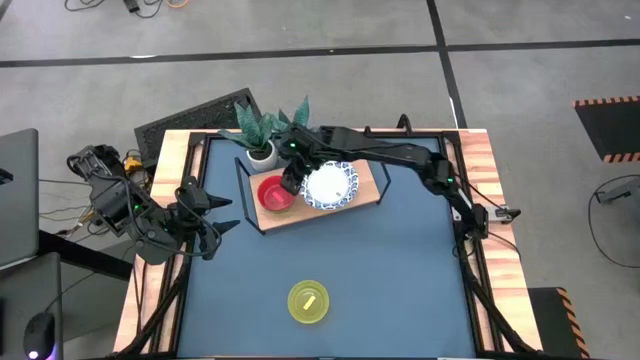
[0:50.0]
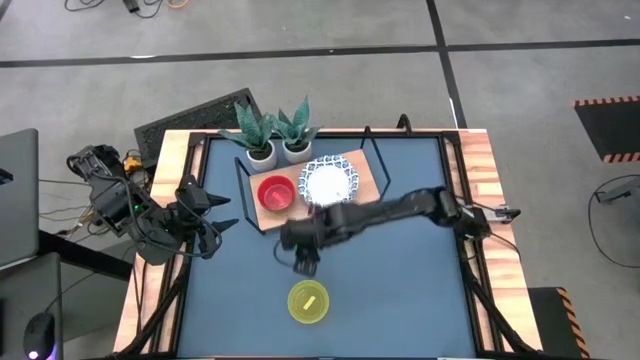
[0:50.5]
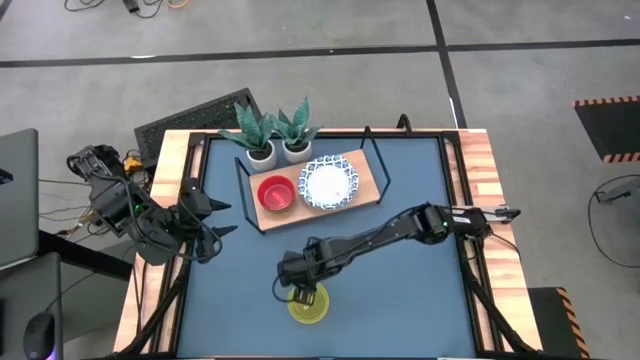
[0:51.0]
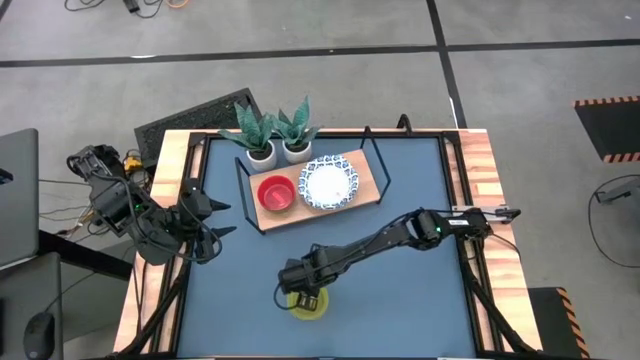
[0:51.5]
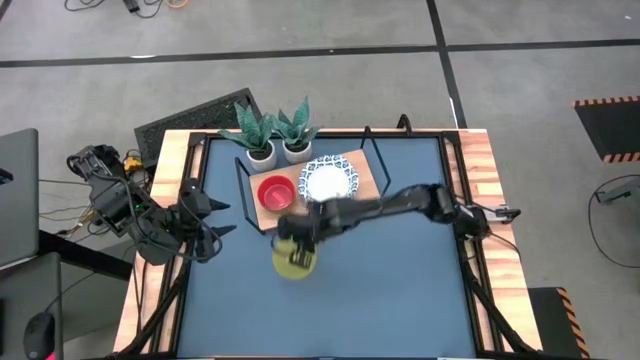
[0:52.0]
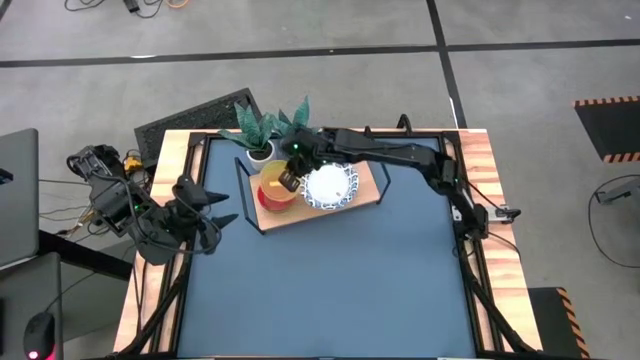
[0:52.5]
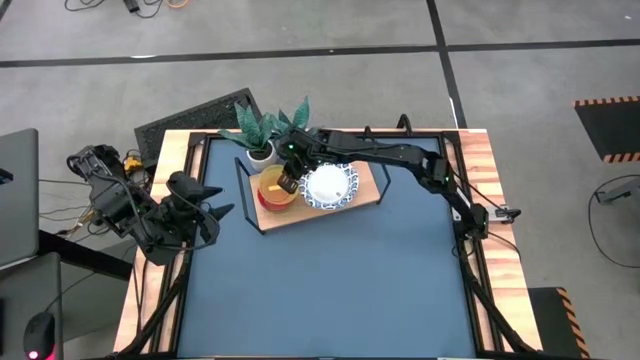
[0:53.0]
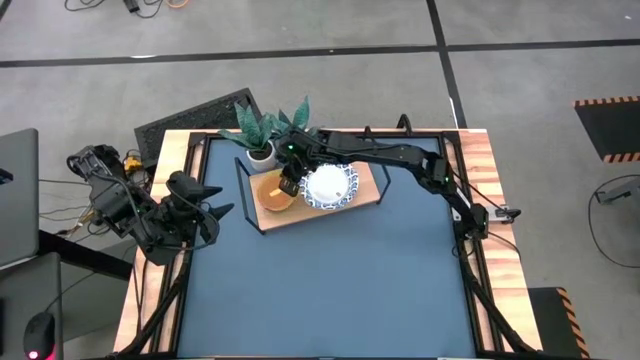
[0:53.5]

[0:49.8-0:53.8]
Task: Place and stack bowls onto a shelf
Stack the yellow bowl on top of the orange bowl on the shelf

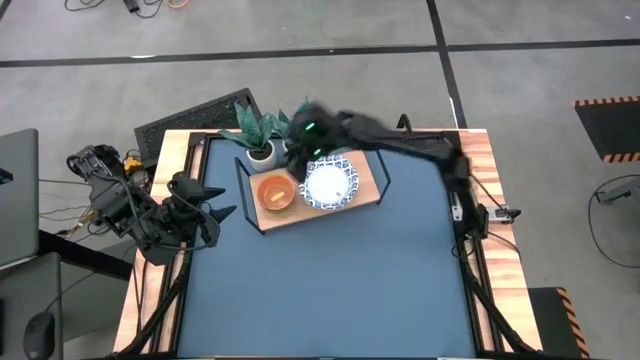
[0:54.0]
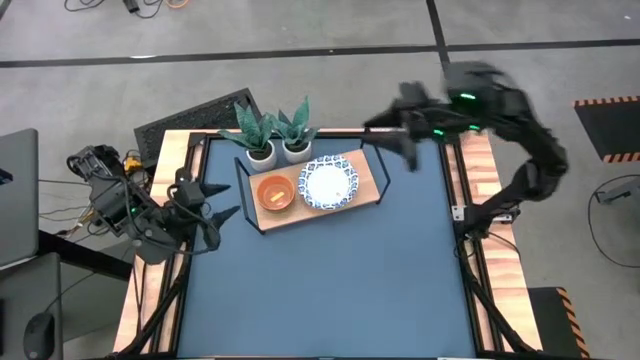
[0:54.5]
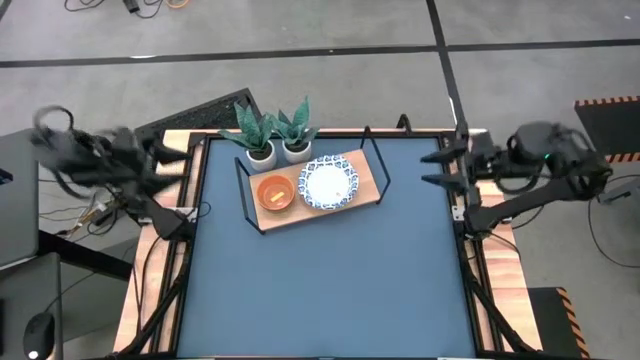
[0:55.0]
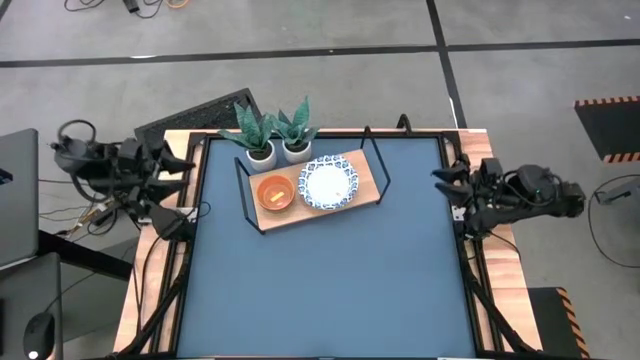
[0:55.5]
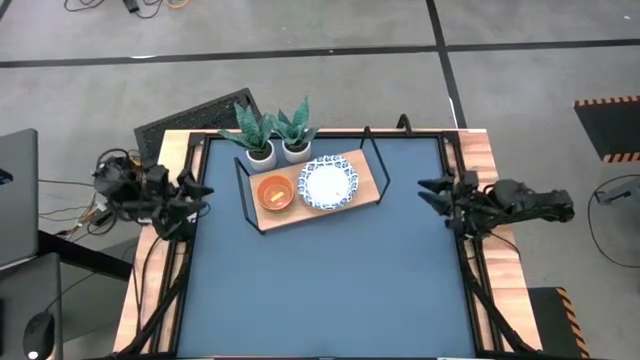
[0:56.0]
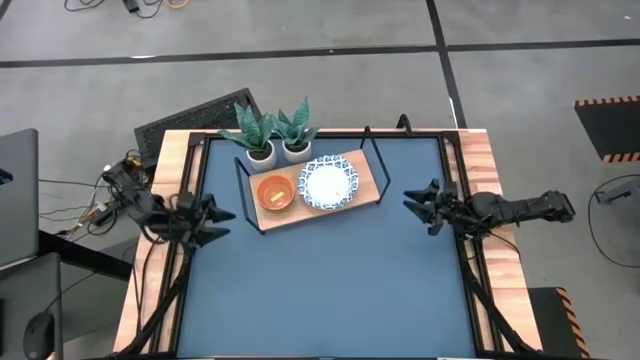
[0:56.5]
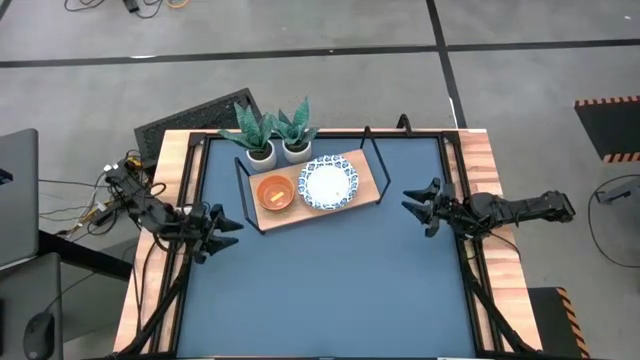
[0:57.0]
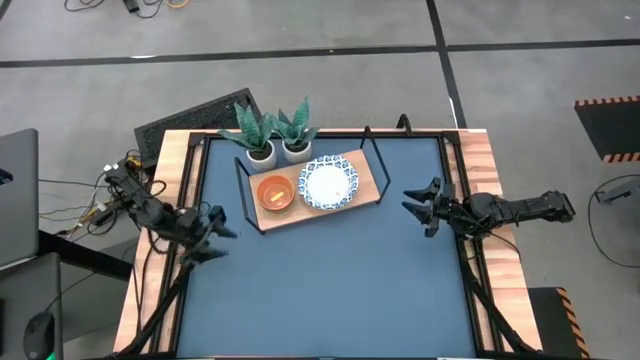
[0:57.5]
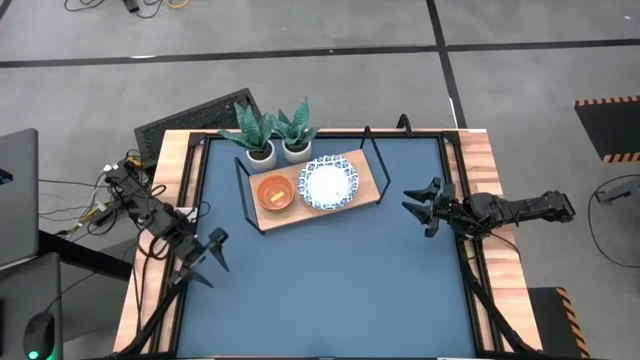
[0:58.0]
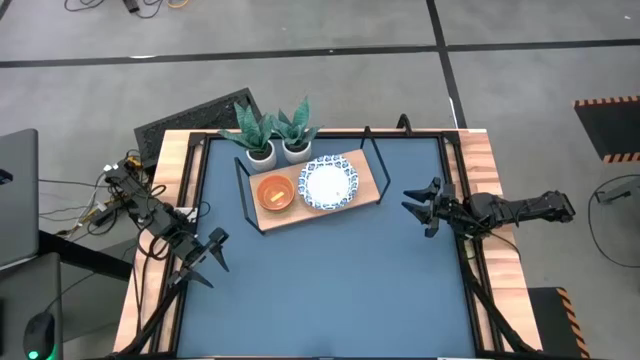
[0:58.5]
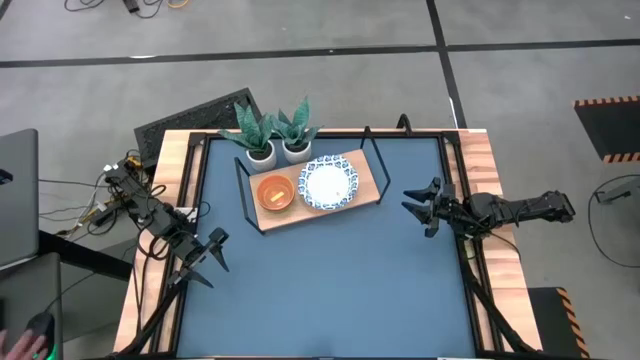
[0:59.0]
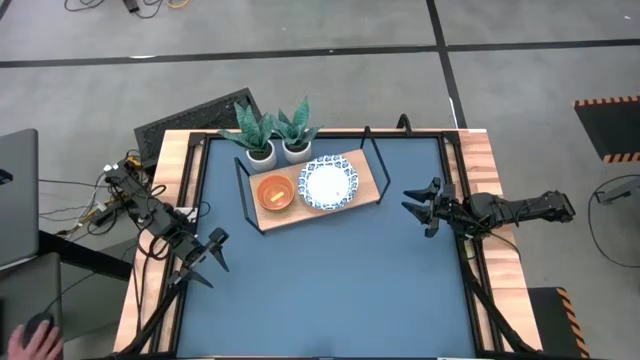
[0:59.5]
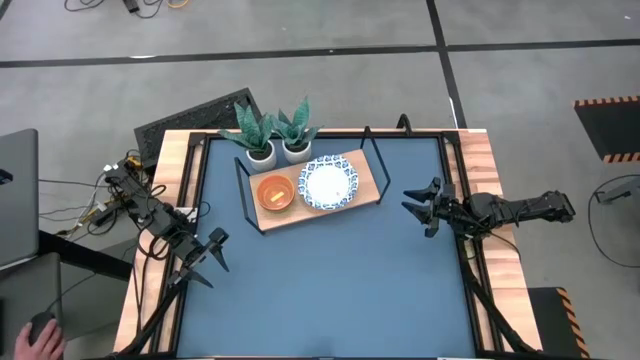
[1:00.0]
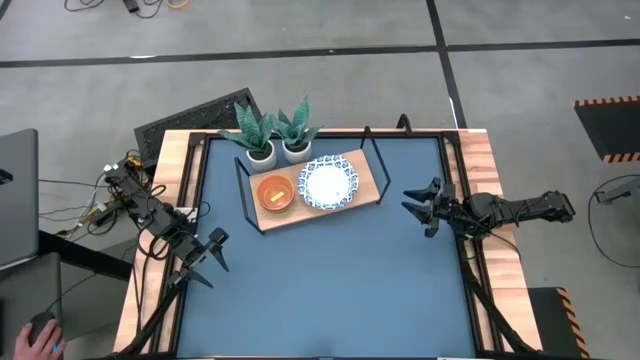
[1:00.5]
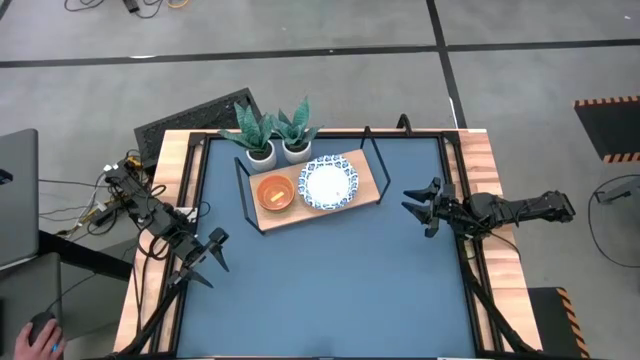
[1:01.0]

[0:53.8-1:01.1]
Return to Home Position

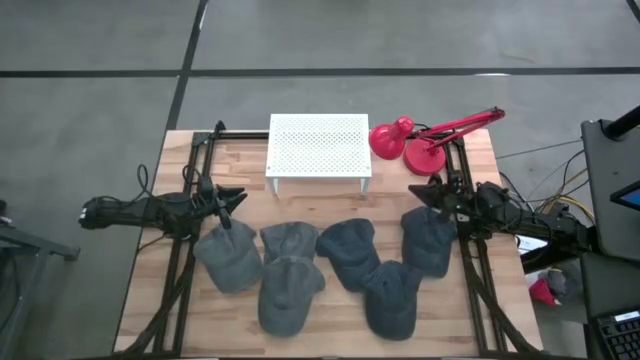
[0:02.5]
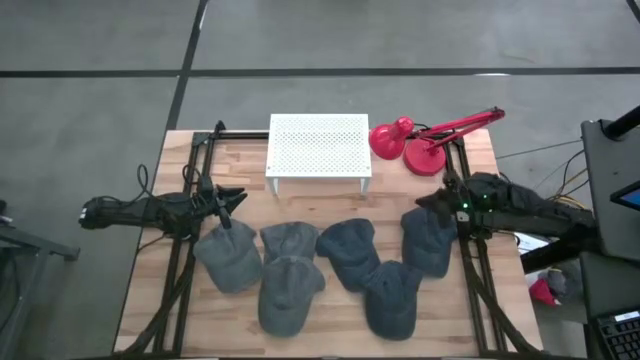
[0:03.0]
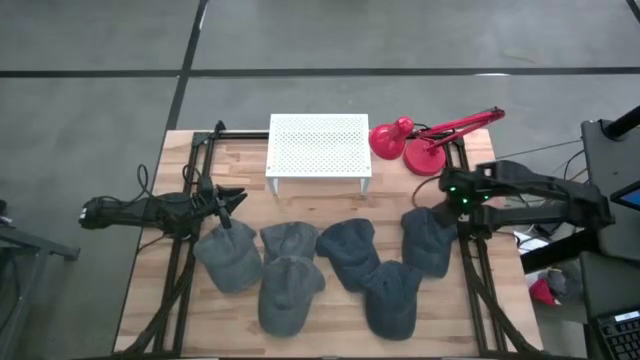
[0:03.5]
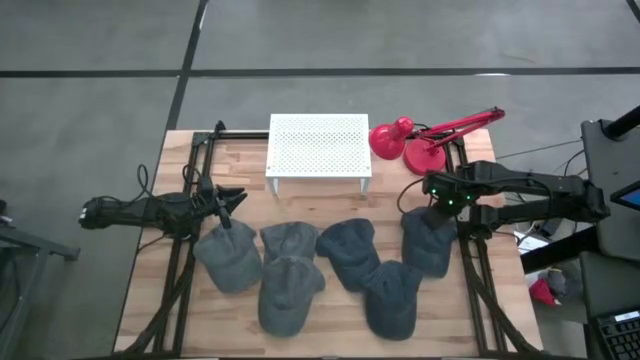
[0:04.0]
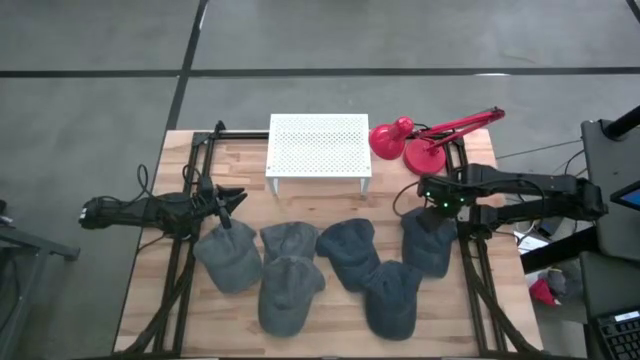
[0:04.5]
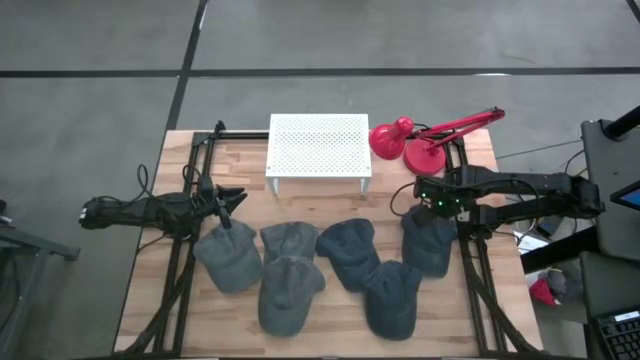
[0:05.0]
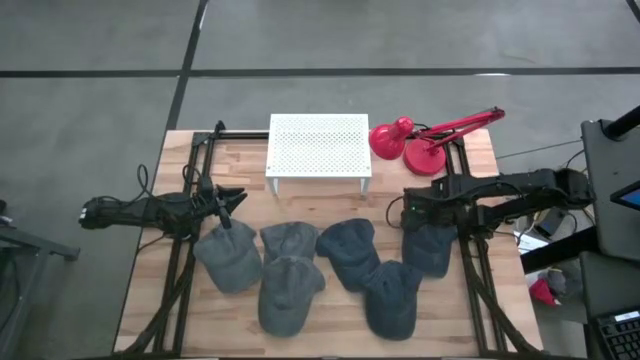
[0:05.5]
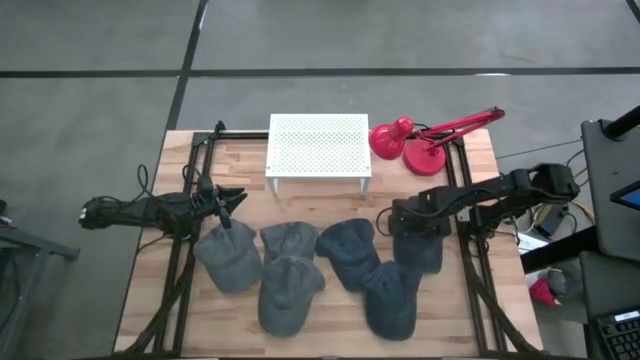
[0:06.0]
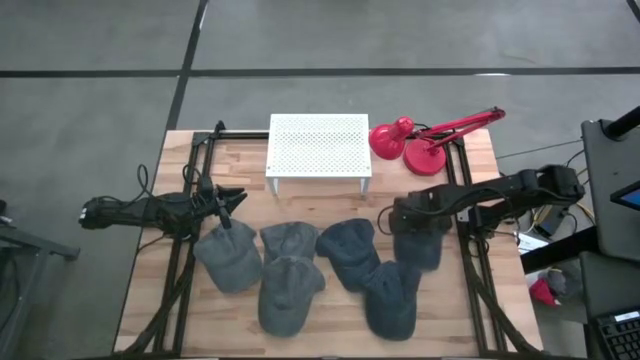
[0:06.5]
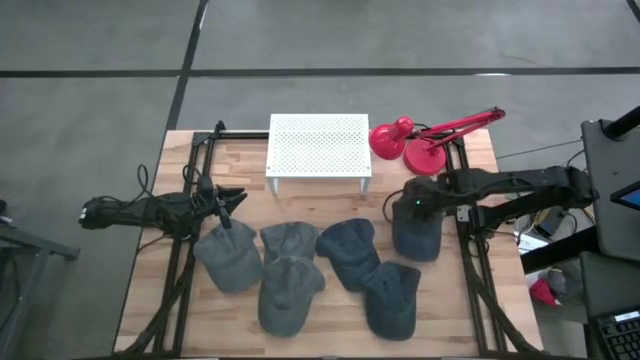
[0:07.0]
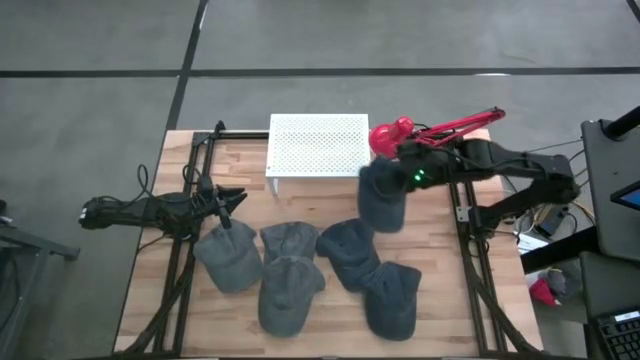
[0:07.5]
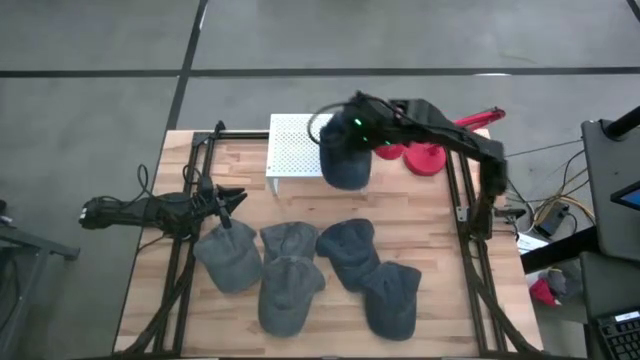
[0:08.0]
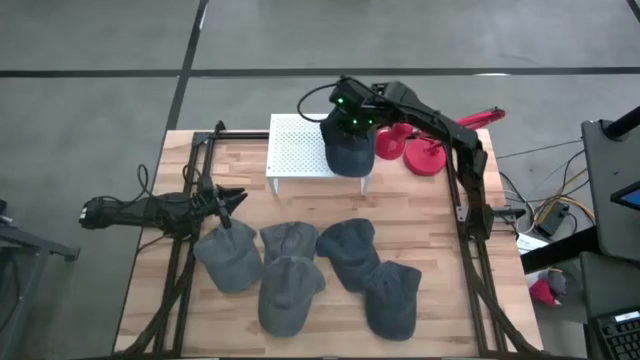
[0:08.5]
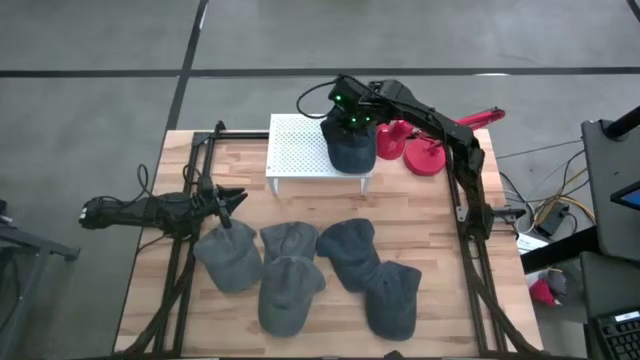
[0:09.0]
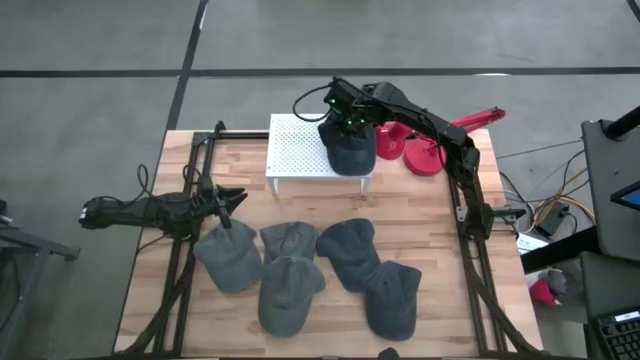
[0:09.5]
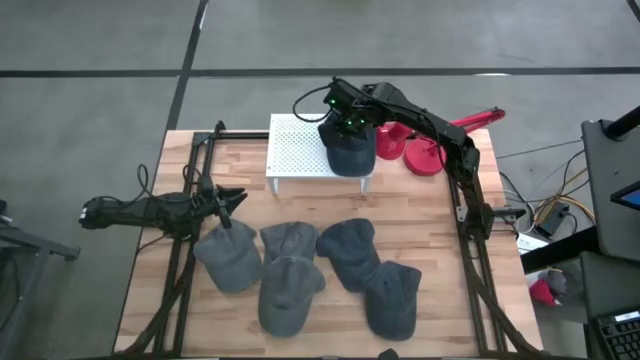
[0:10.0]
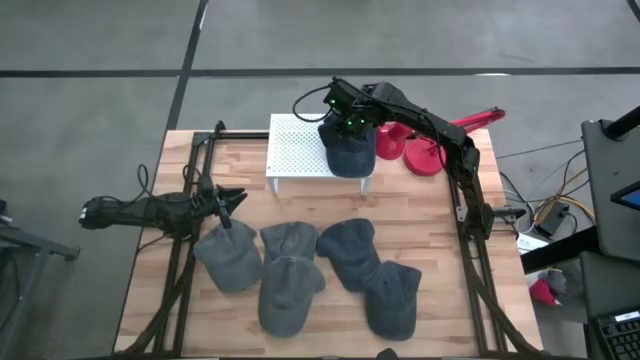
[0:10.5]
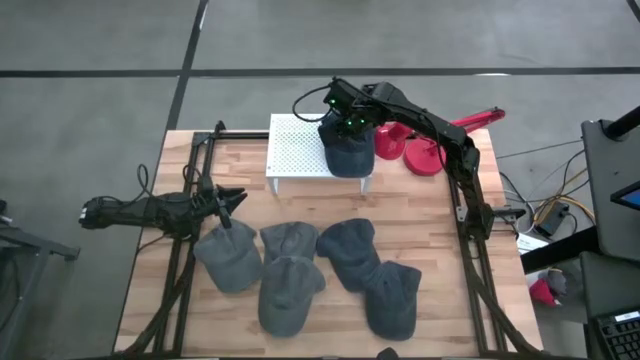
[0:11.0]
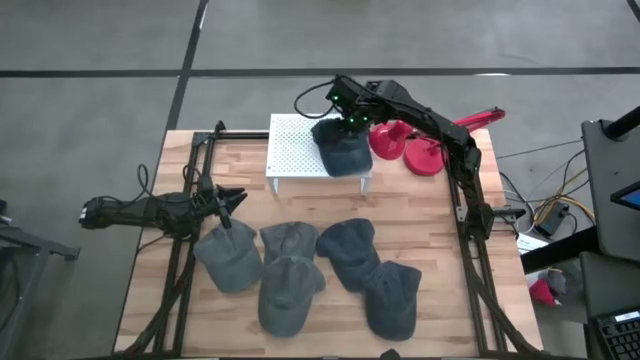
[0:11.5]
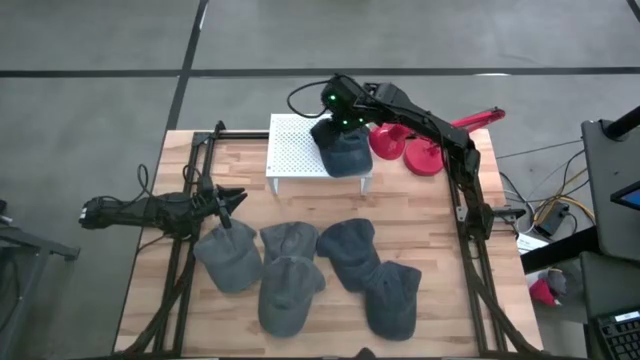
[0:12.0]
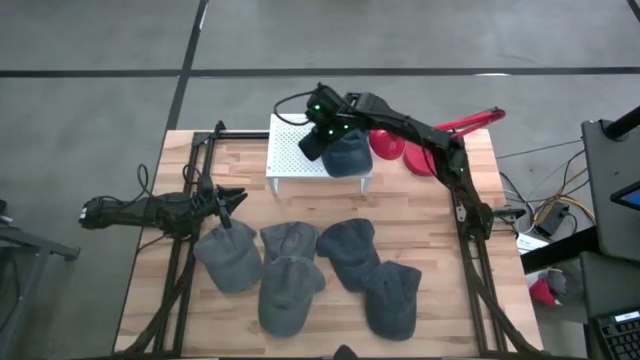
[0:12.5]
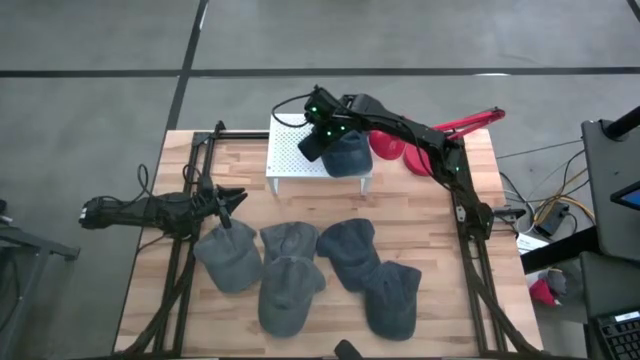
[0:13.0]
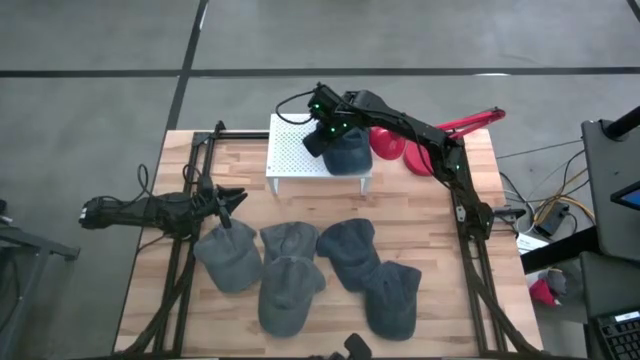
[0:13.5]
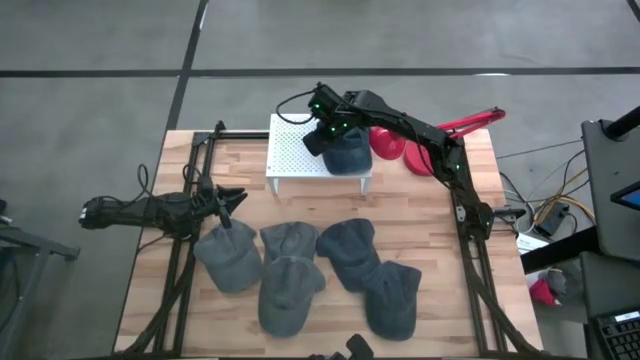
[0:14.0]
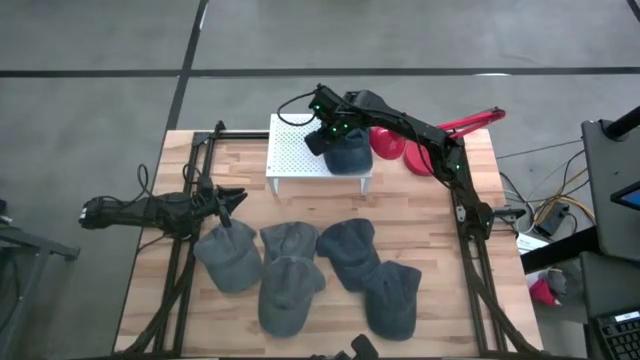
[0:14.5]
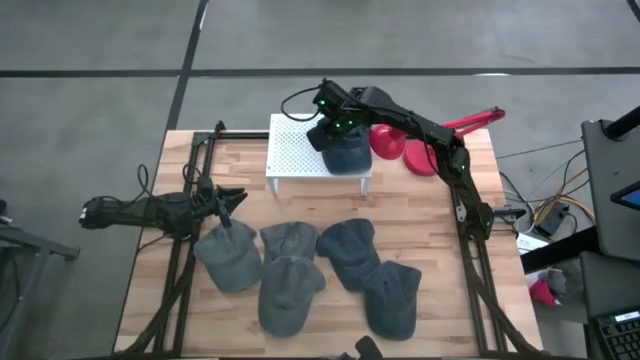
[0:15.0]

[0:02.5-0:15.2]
Task: Pick & Place hat
Put the top right blue cap on the shelf
